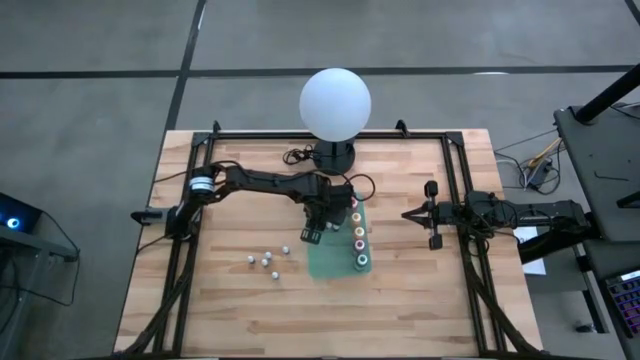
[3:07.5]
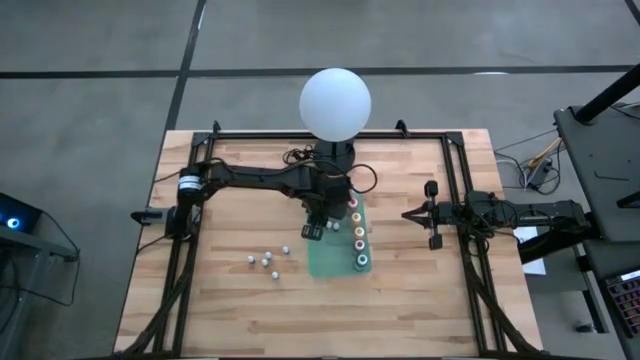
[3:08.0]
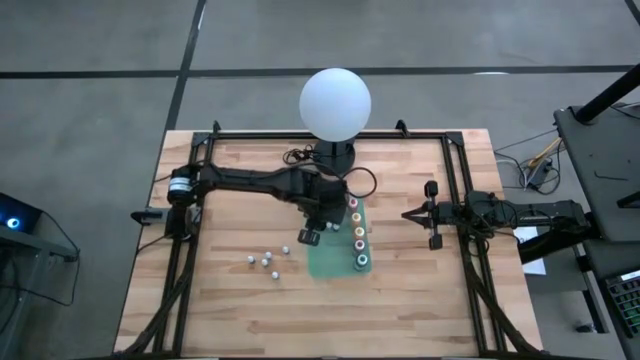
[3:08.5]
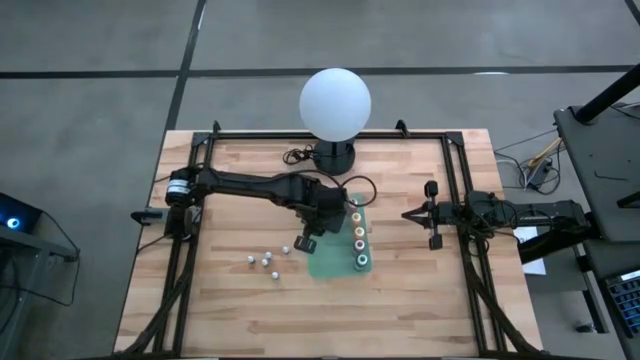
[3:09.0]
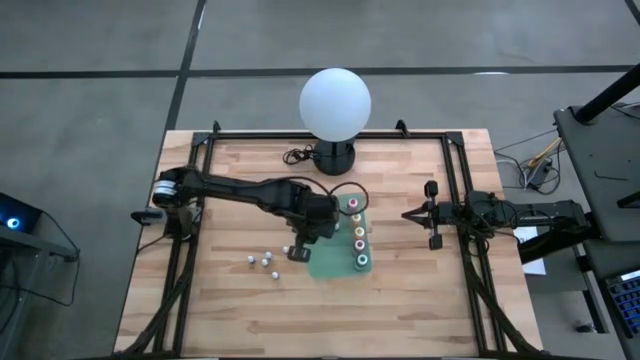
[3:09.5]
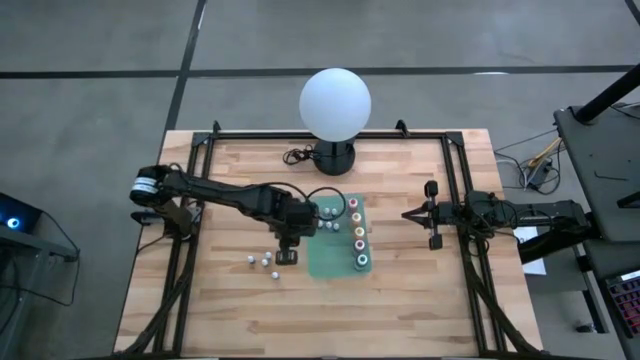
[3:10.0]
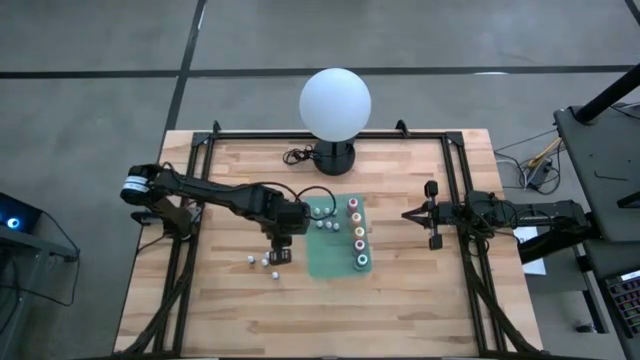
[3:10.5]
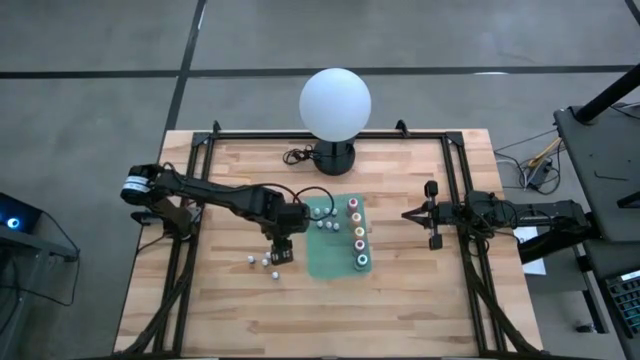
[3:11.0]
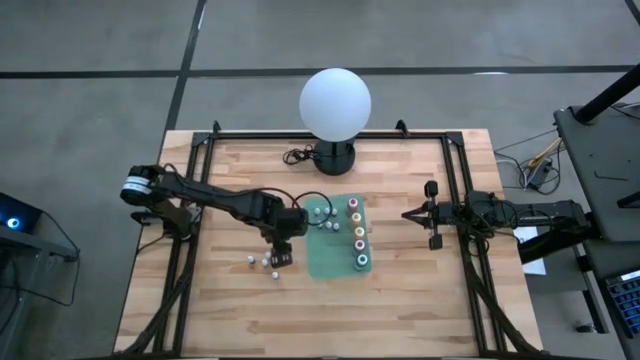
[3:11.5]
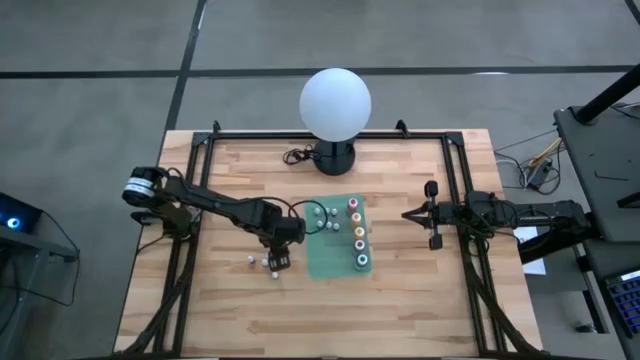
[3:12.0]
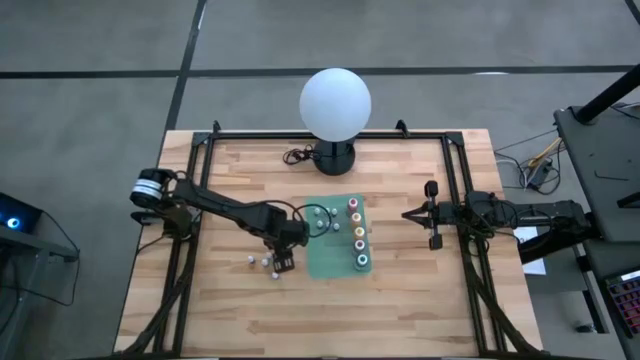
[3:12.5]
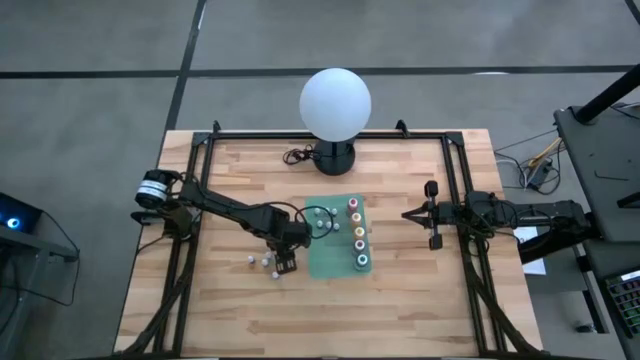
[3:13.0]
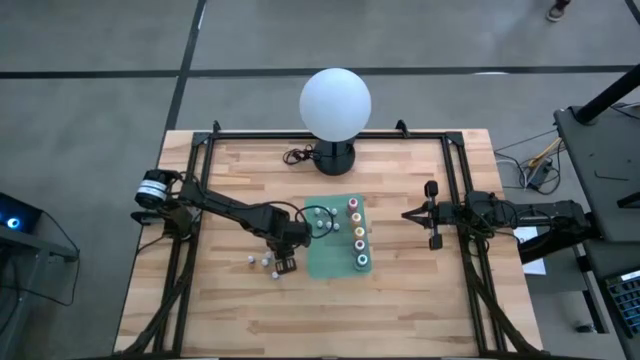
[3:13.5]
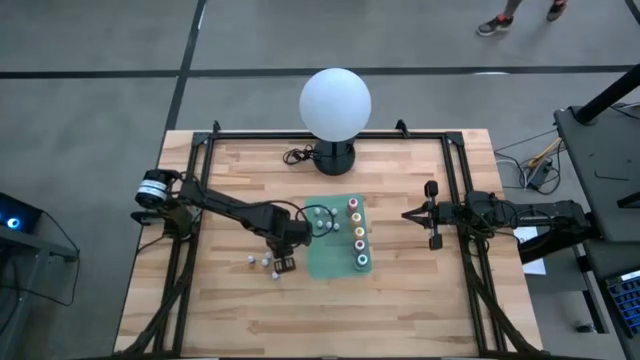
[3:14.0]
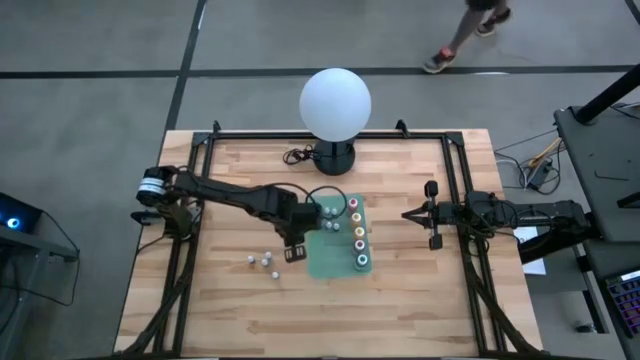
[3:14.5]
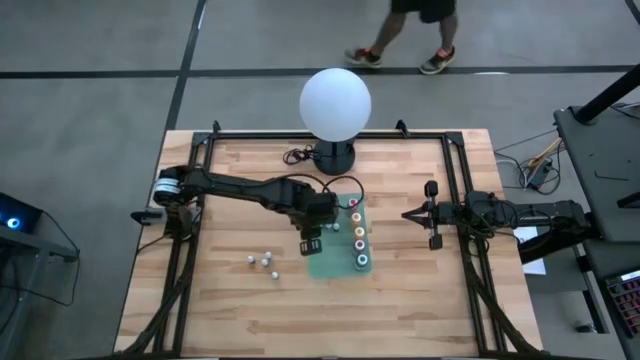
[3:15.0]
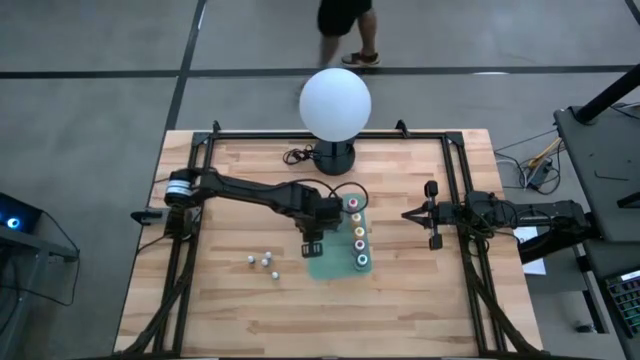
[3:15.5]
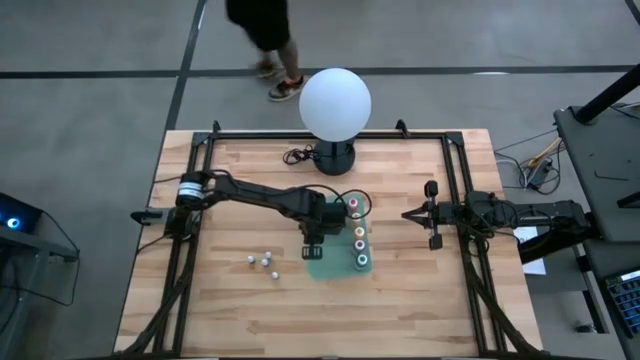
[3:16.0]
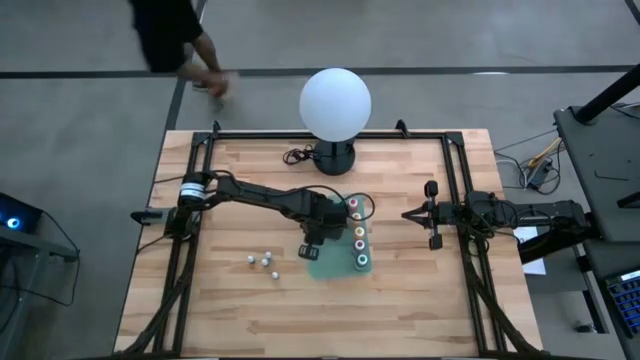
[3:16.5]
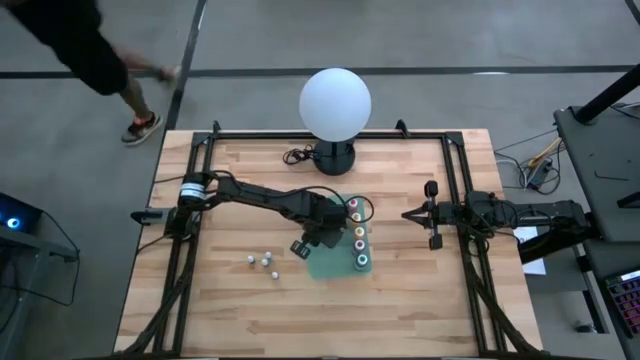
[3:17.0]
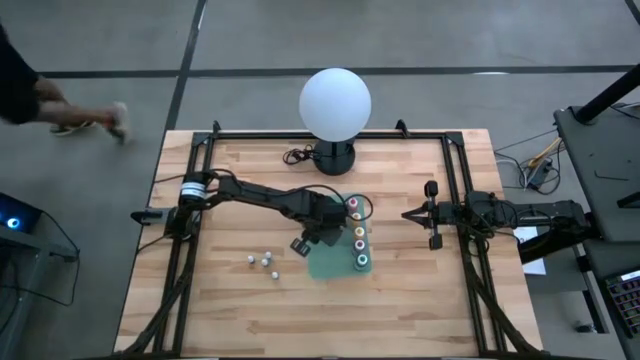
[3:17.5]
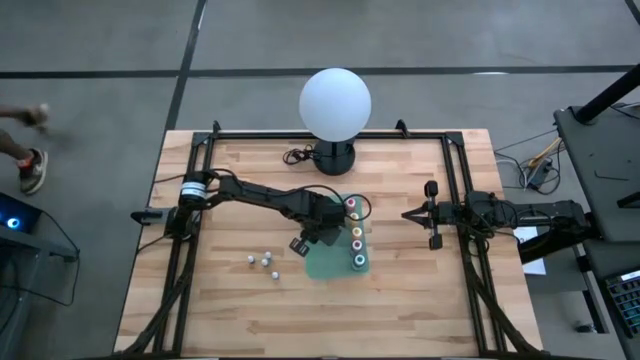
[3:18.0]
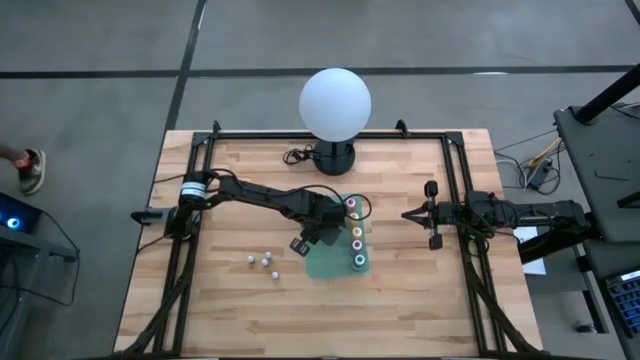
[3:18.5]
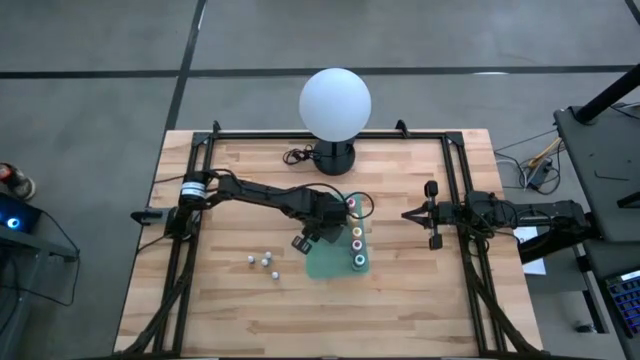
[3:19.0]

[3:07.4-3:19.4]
Task: Pick & Place food coloring
Put the small purple food coloring bottle into the green bin

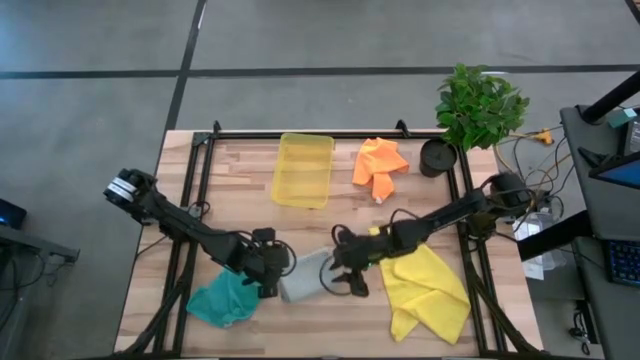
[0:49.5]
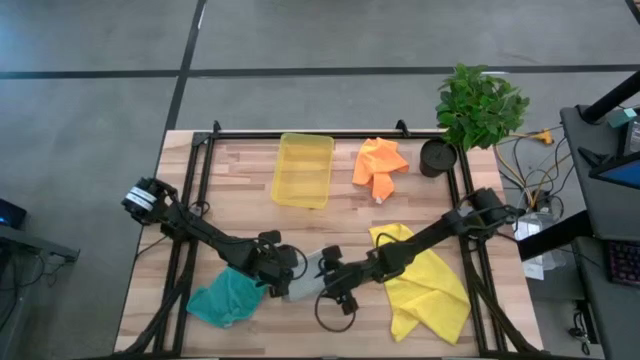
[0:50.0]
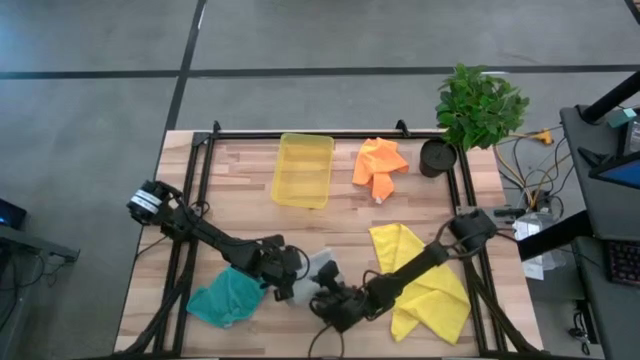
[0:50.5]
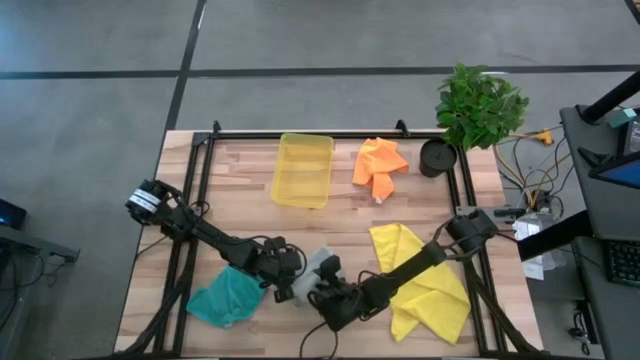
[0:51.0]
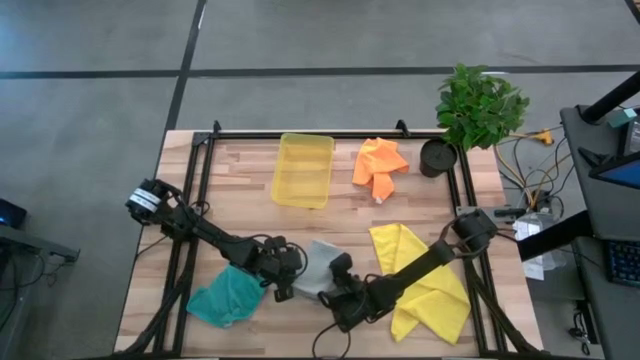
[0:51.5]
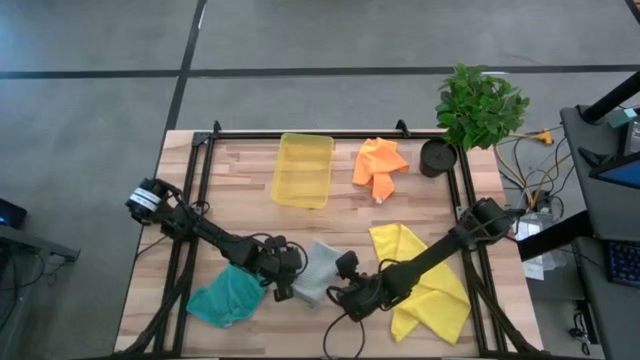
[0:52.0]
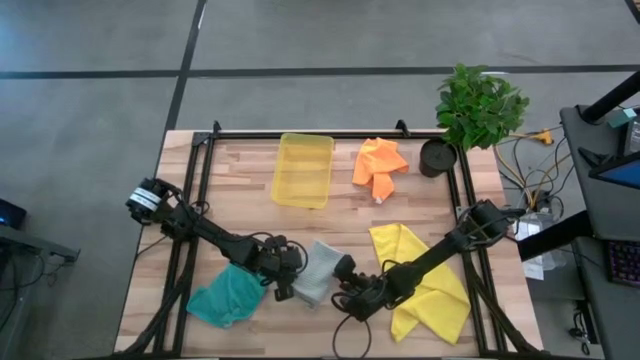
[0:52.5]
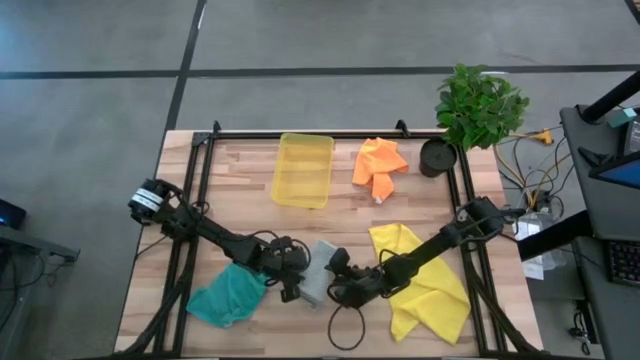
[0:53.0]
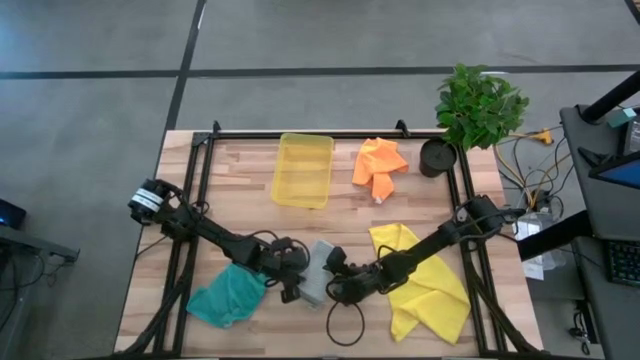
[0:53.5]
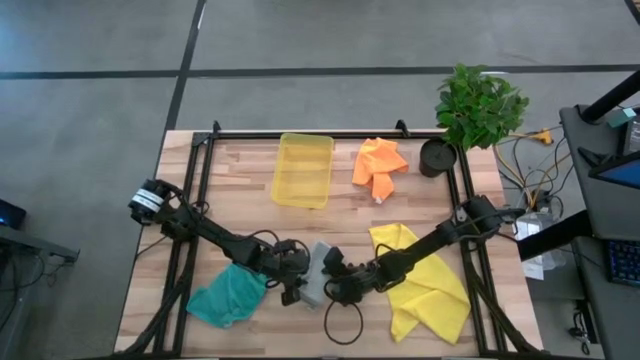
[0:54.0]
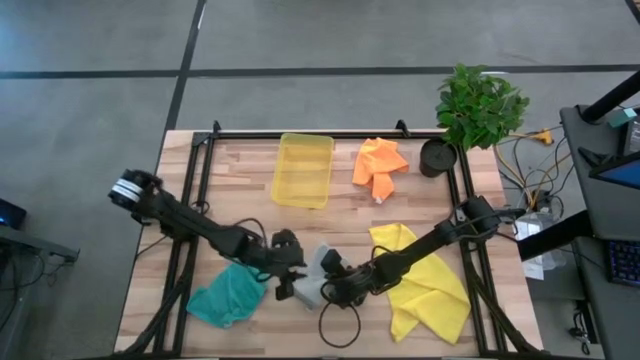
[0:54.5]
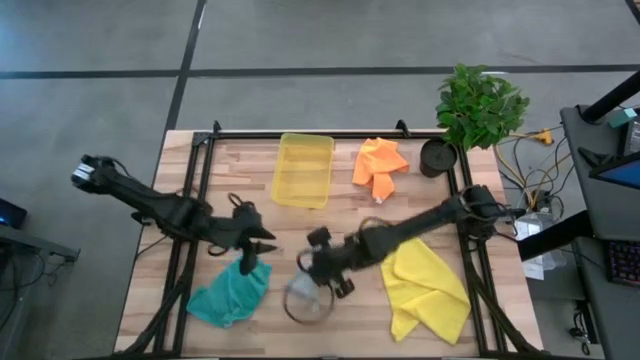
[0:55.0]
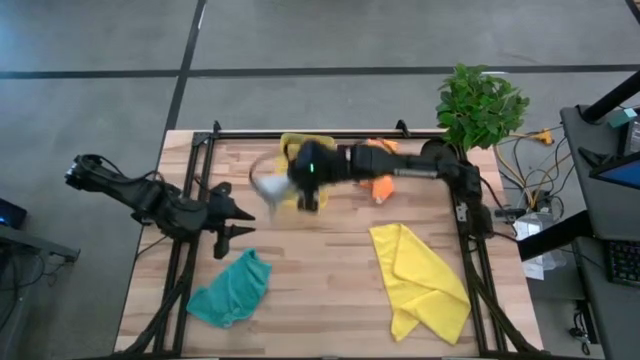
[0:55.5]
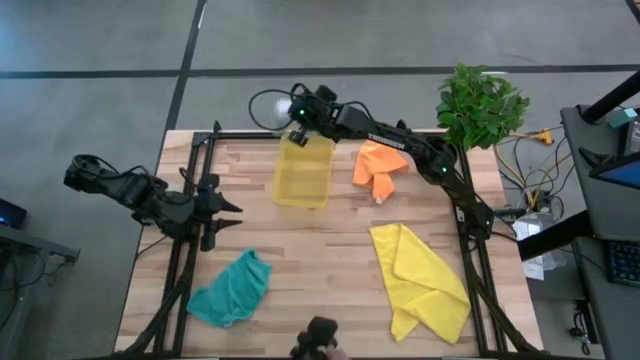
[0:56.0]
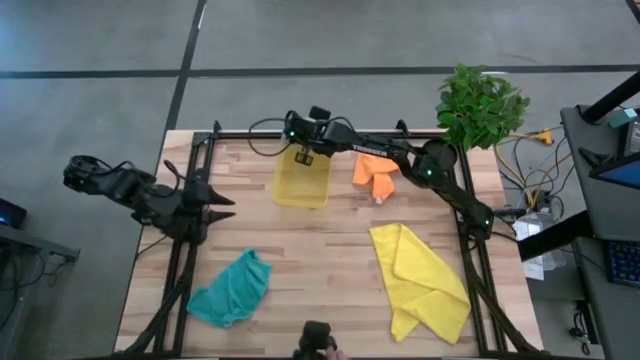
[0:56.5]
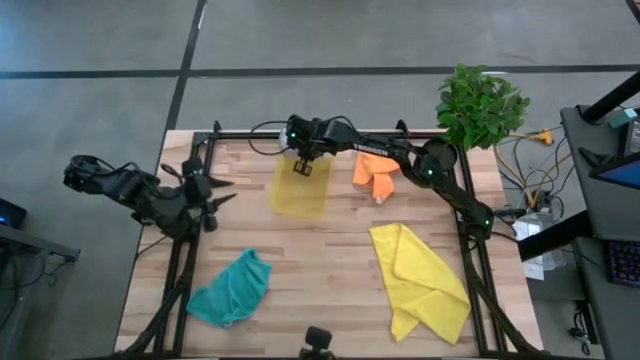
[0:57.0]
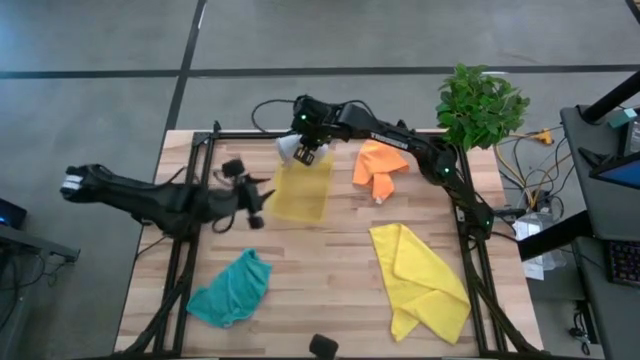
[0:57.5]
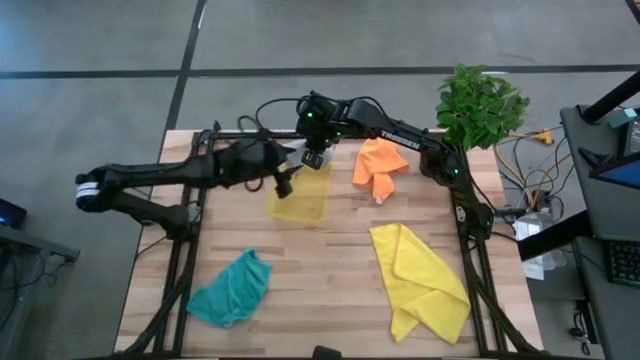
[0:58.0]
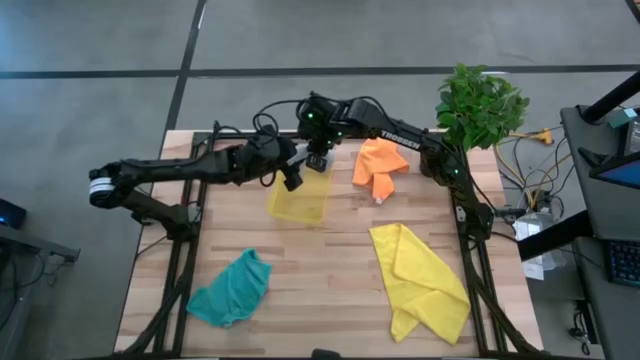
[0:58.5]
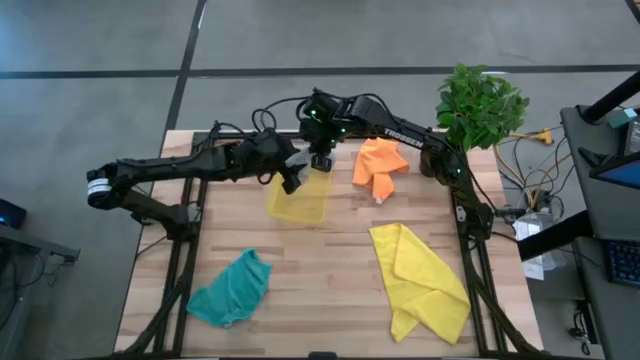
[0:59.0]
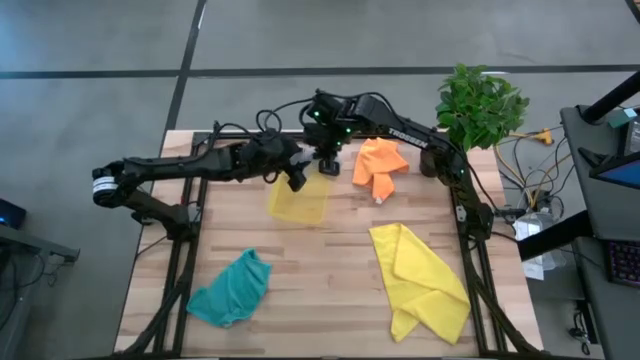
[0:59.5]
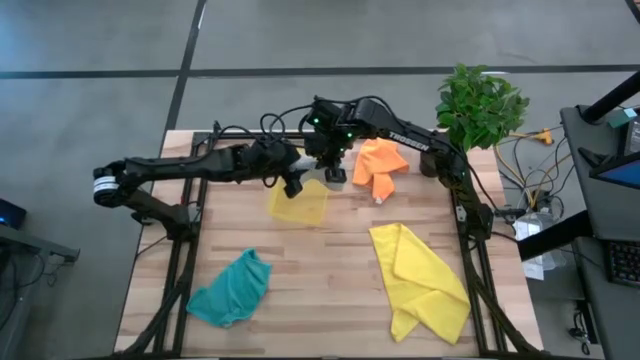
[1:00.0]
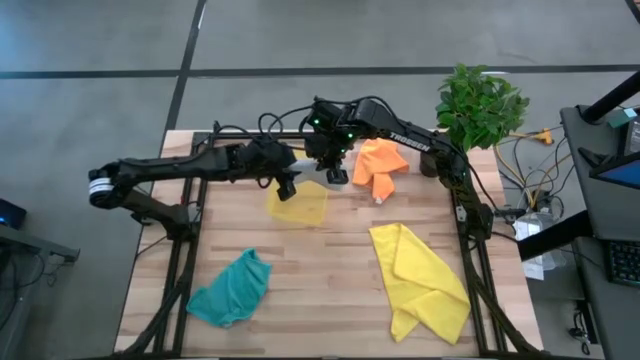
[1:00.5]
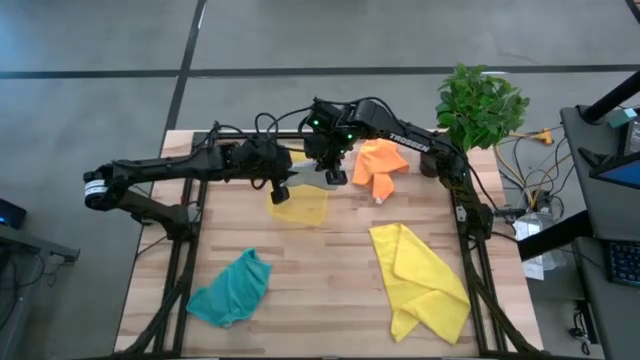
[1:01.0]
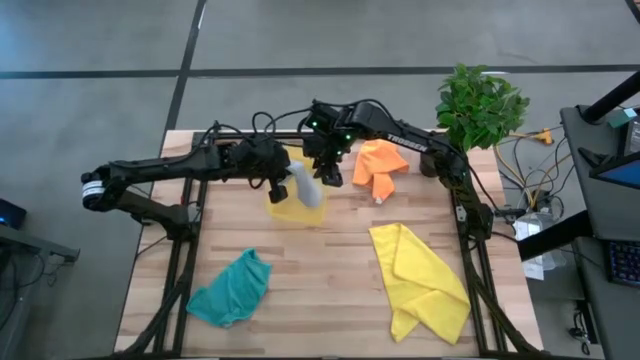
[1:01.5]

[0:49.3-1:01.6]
Task: Fold microfiber towels
Put the folded gray microfiber cloth into the yellow bin
